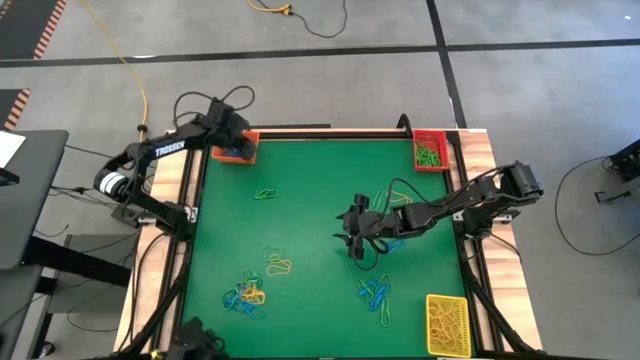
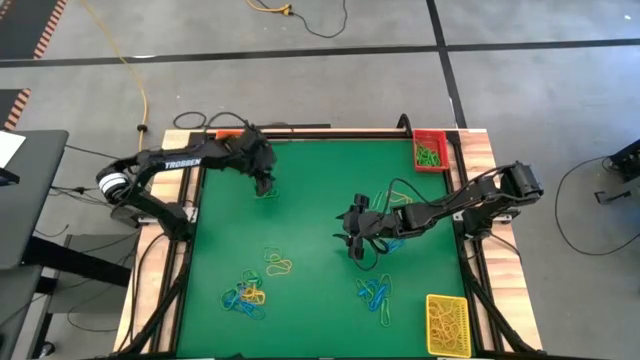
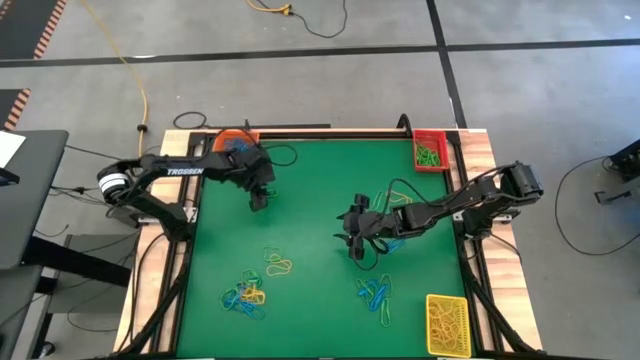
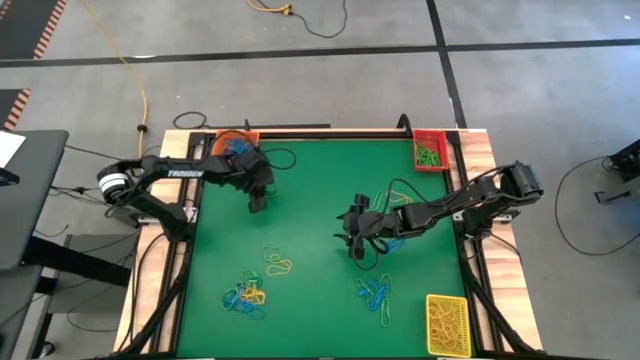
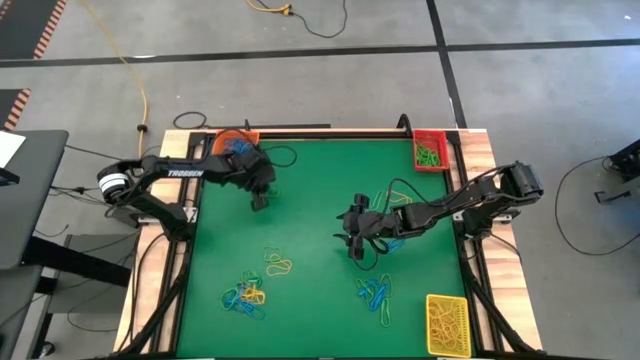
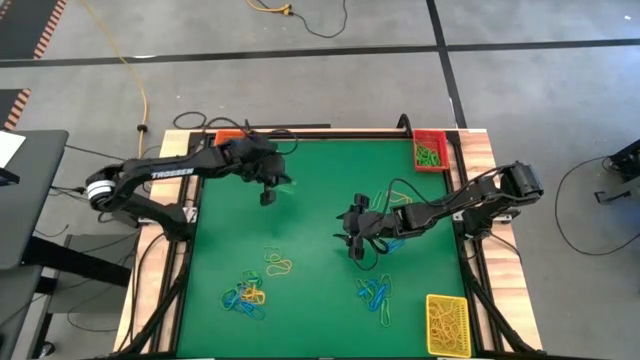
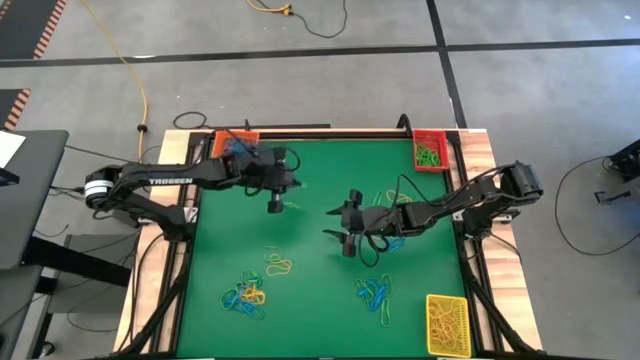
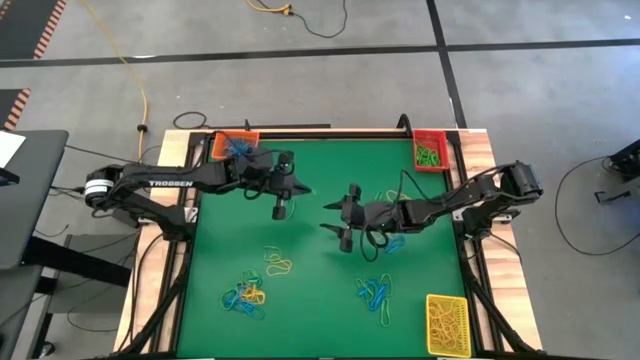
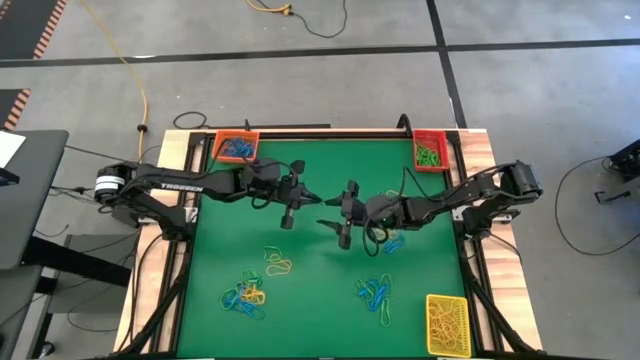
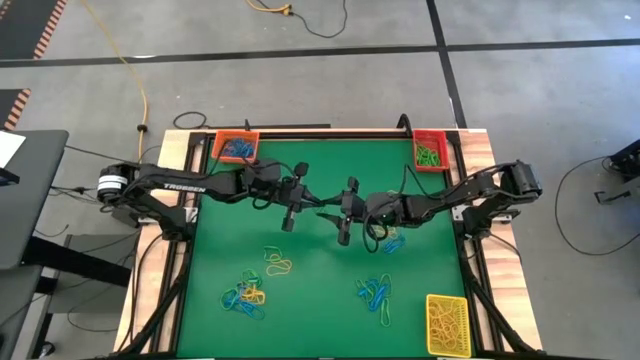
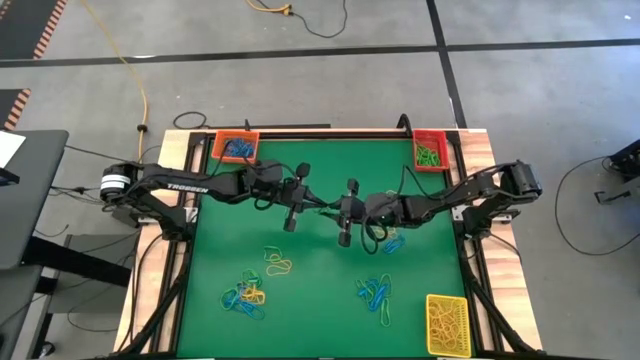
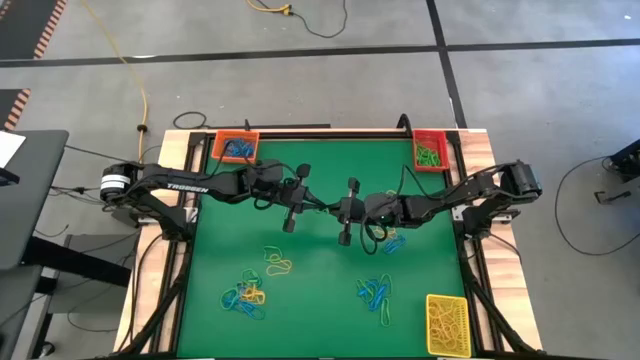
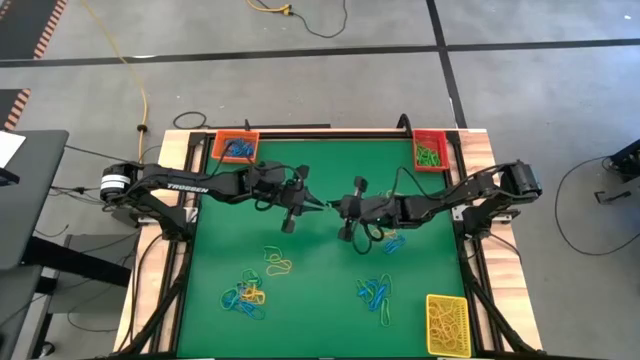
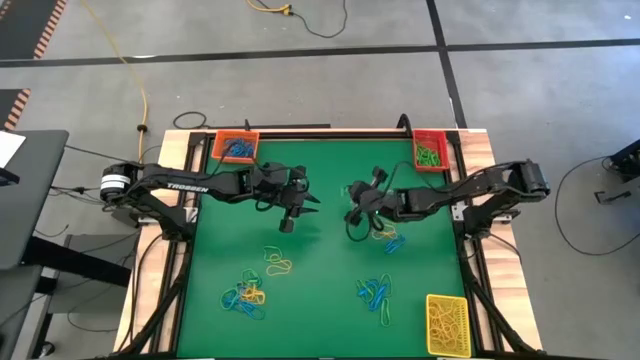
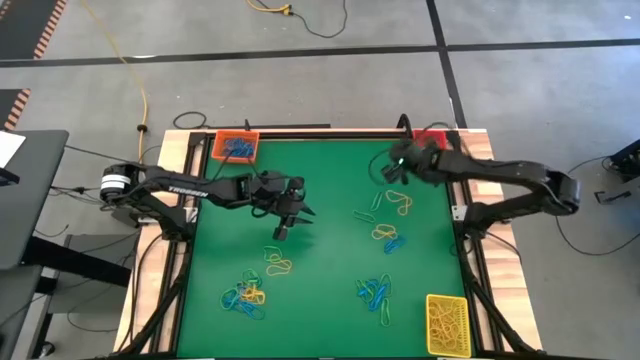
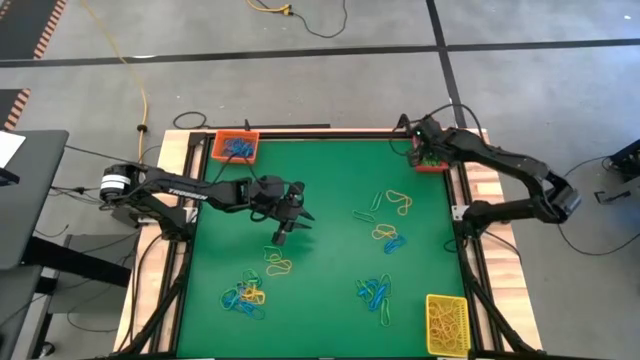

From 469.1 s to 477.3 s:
Task: Sort rubber bands into baskets
Put the top left green rubber band into the red bin

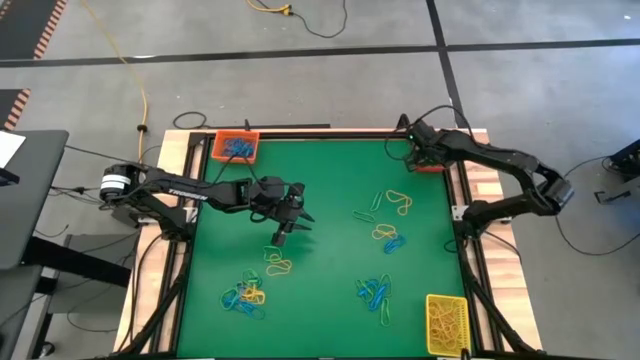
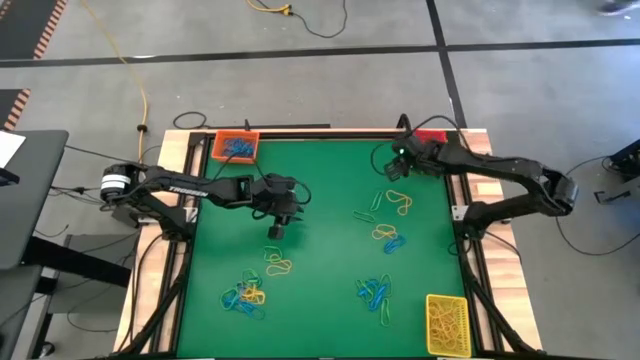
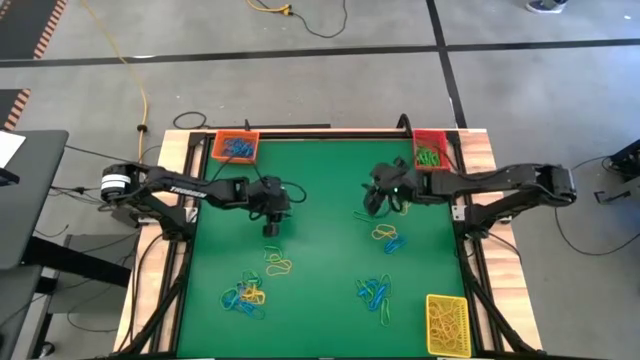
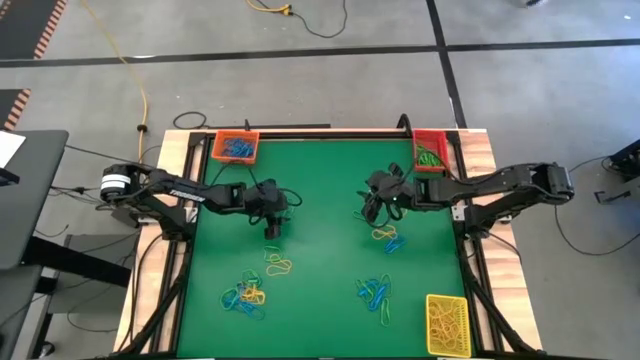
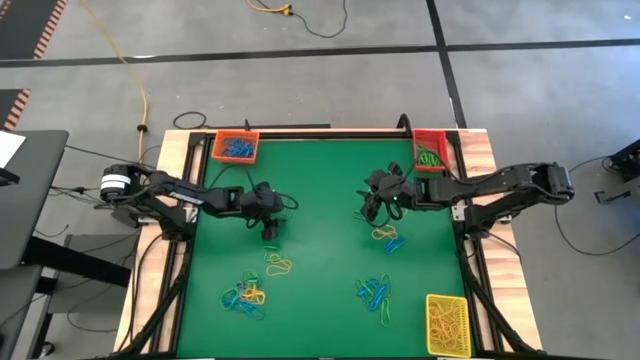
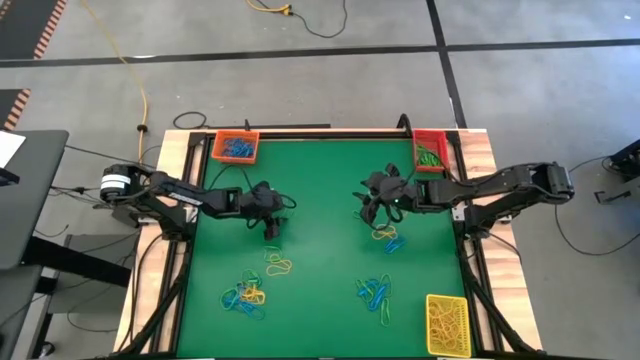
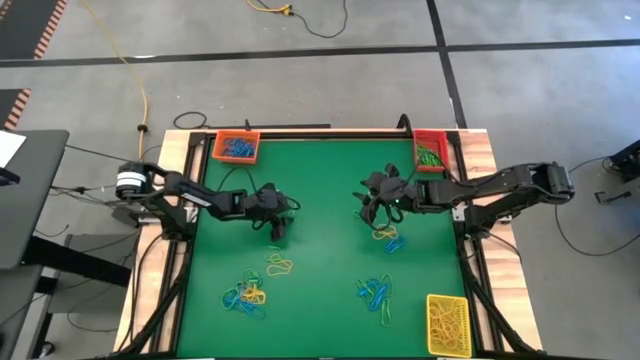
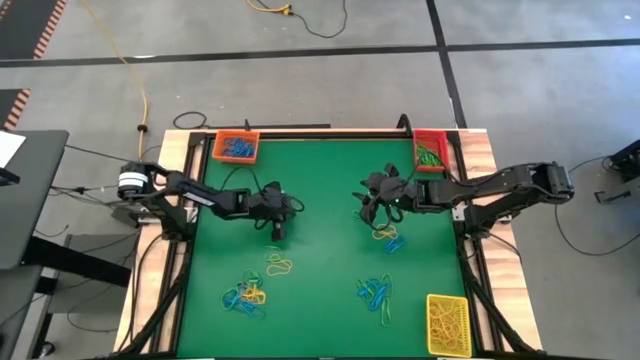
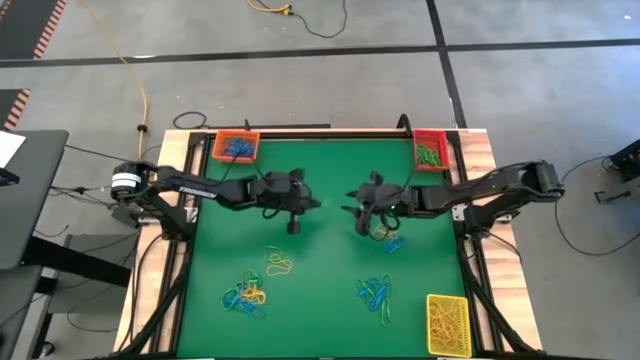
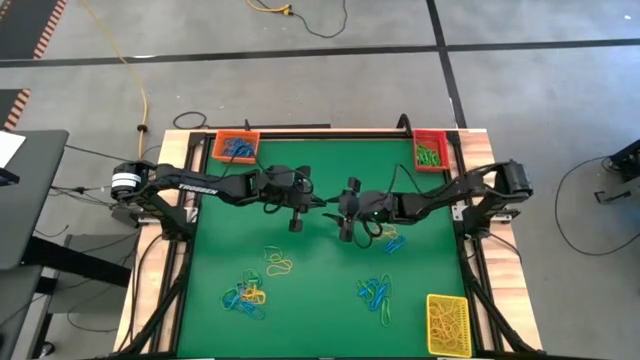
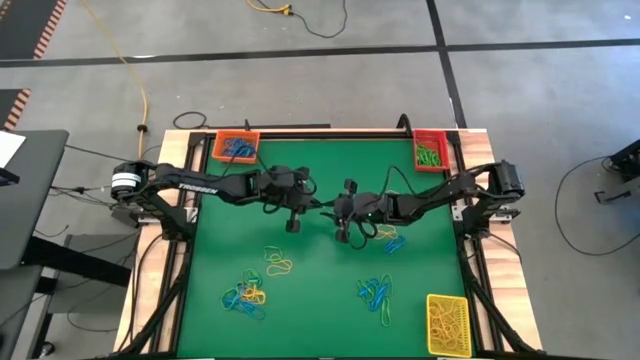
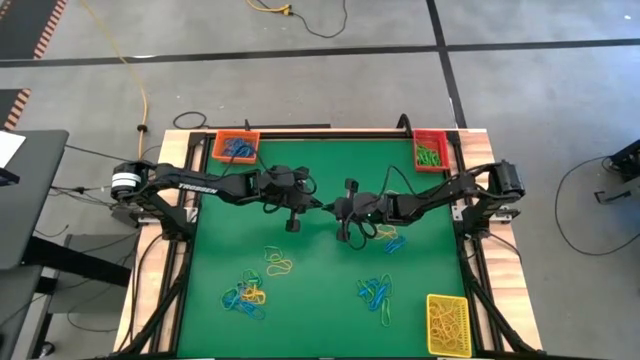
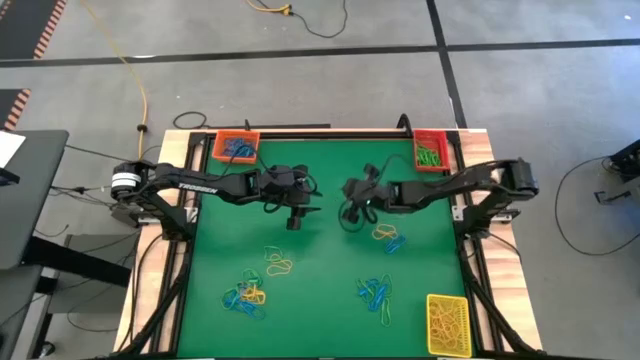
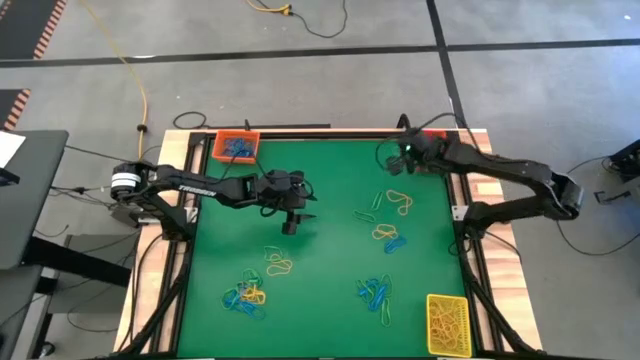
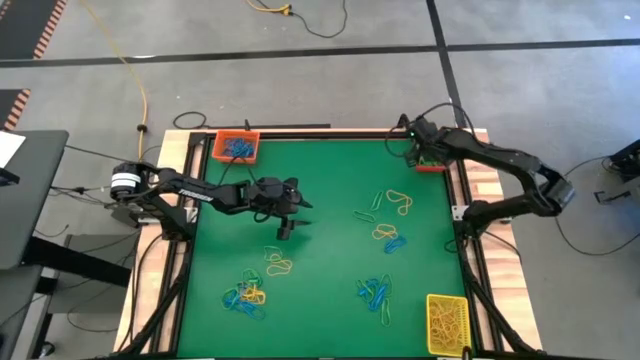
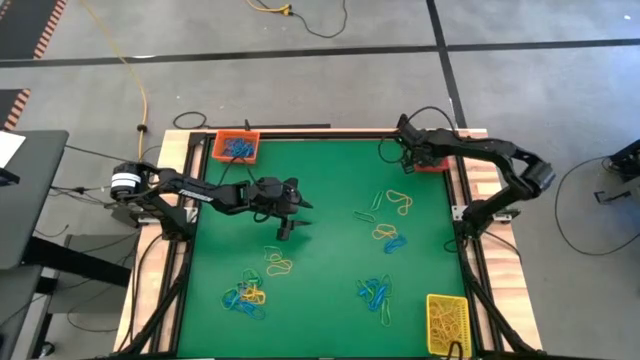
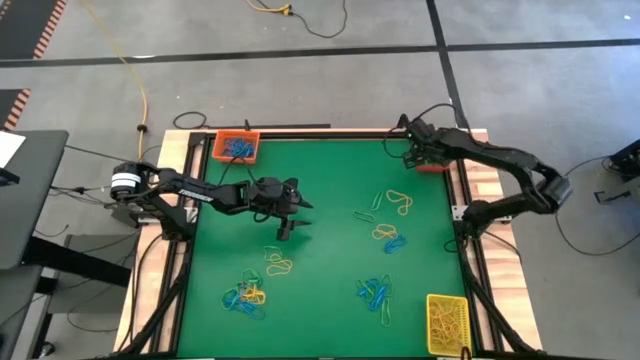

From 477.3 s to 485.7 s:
Put the top left green rubber band into the red bin

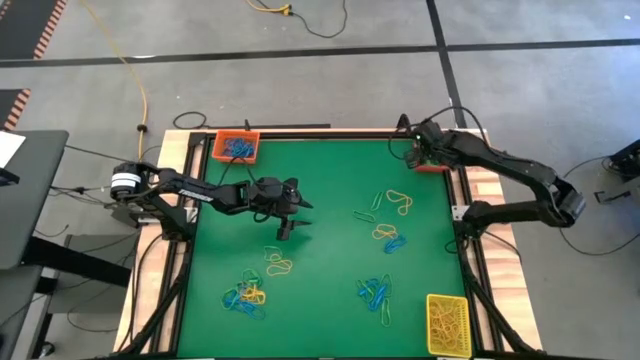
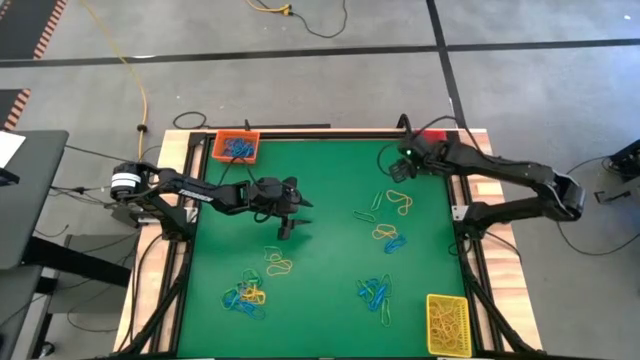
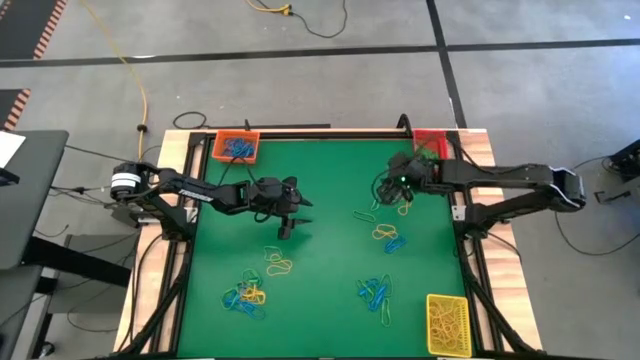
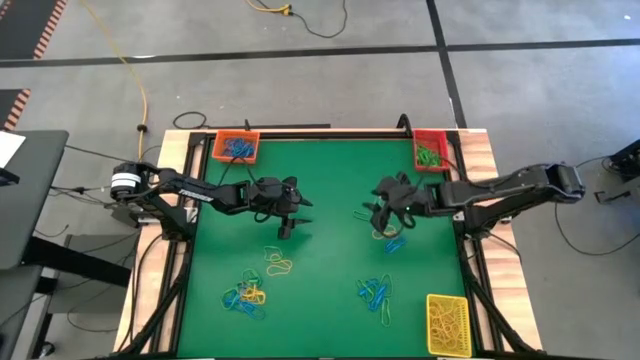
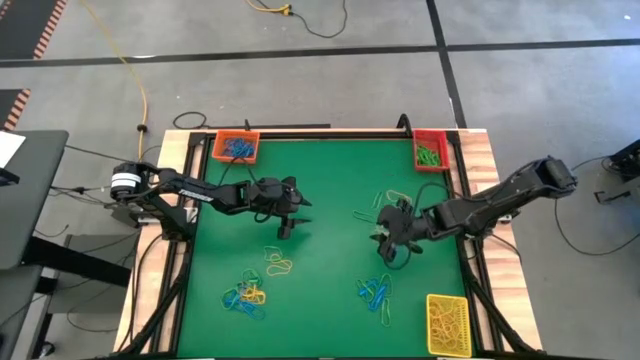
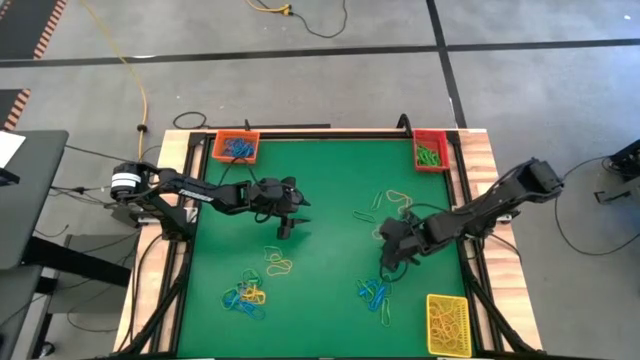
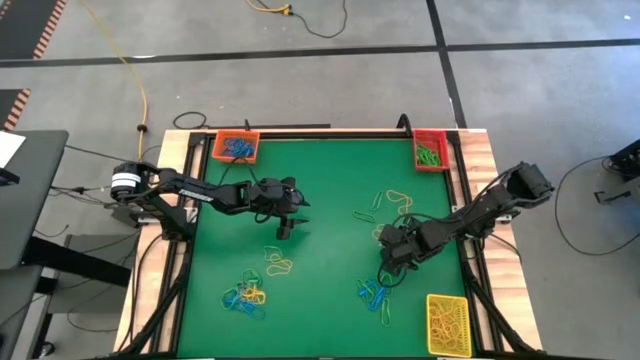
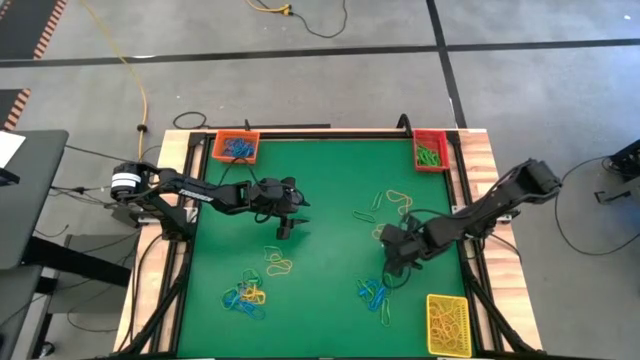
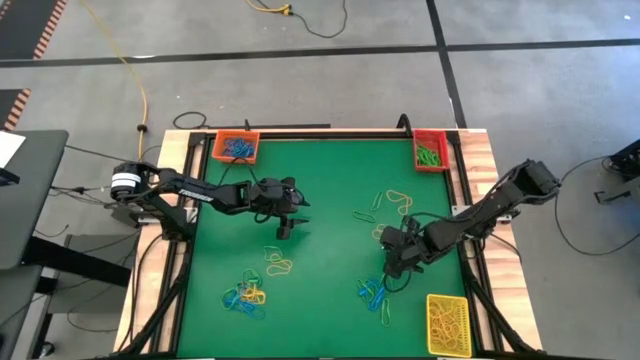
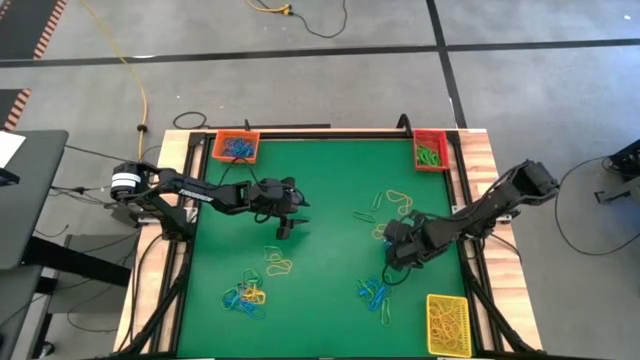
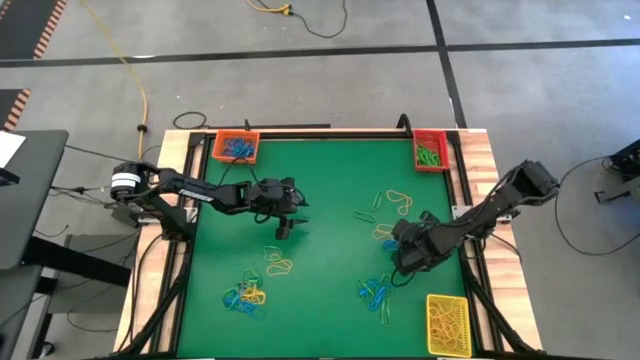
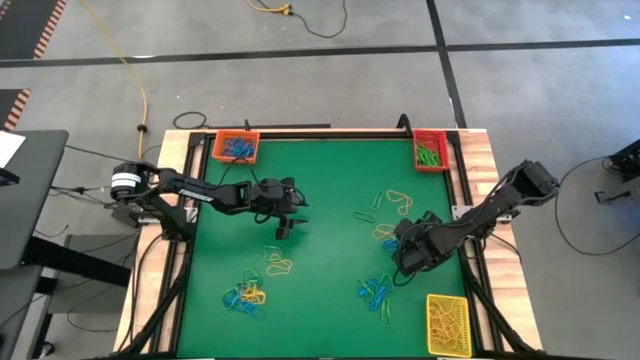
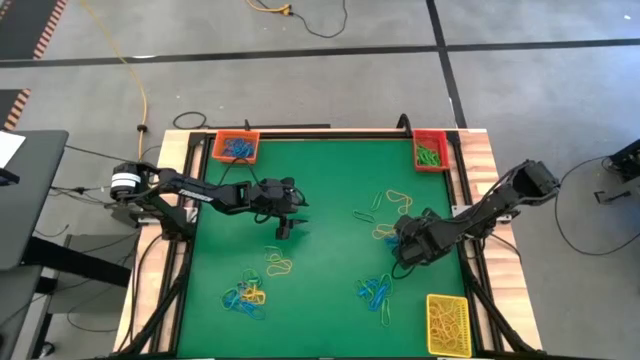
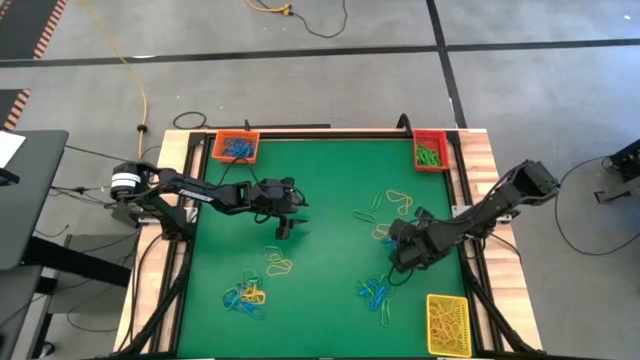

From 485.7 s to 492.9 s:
Put the top right blue rubber band into the orange bin
